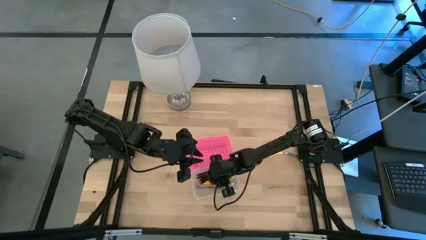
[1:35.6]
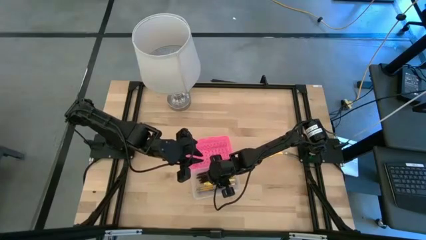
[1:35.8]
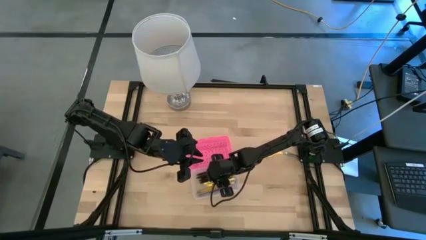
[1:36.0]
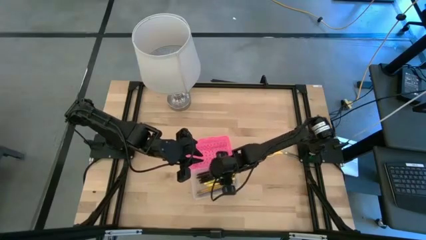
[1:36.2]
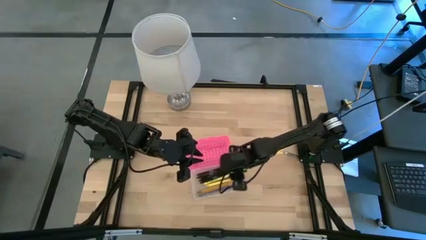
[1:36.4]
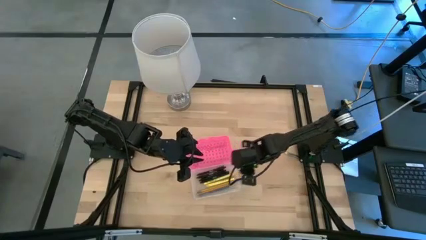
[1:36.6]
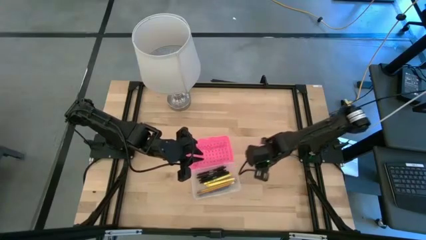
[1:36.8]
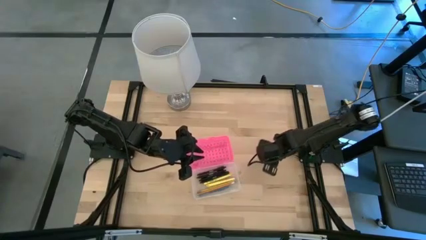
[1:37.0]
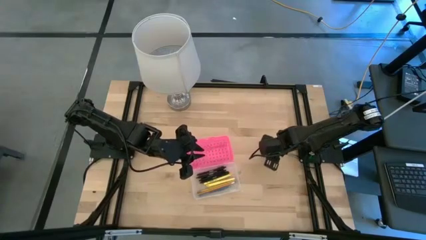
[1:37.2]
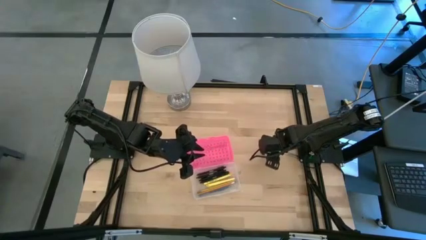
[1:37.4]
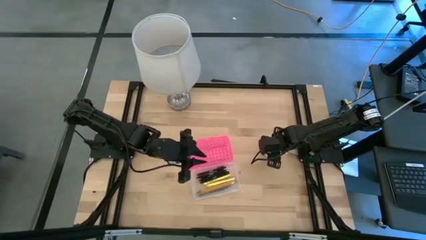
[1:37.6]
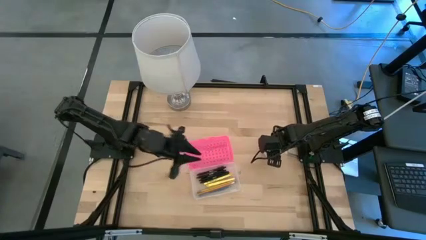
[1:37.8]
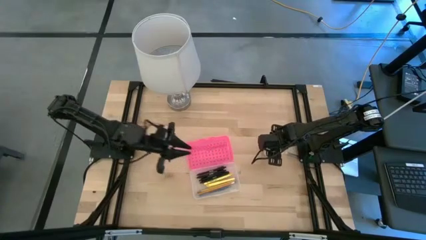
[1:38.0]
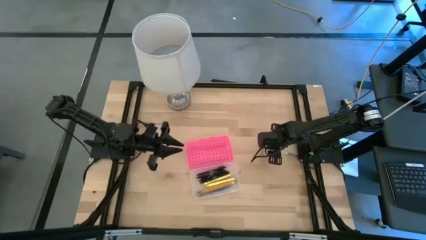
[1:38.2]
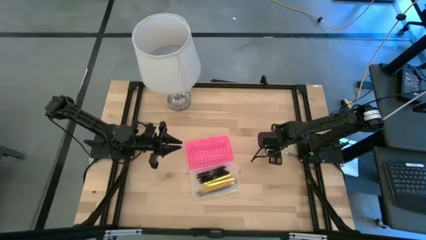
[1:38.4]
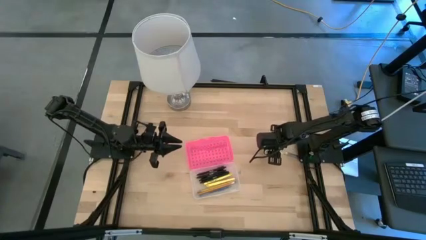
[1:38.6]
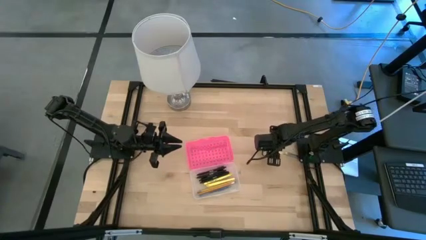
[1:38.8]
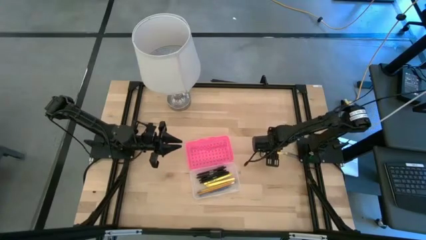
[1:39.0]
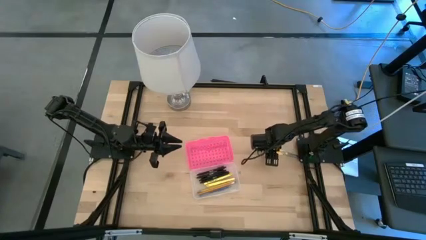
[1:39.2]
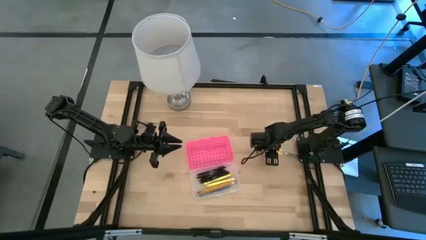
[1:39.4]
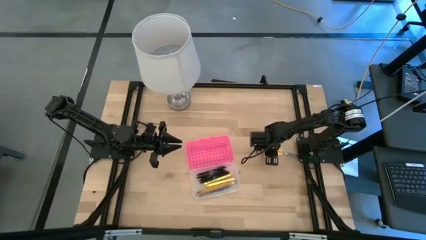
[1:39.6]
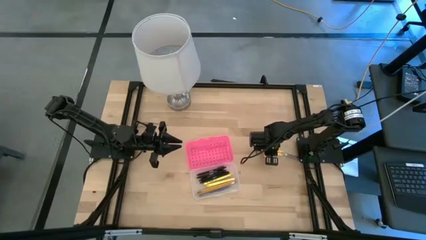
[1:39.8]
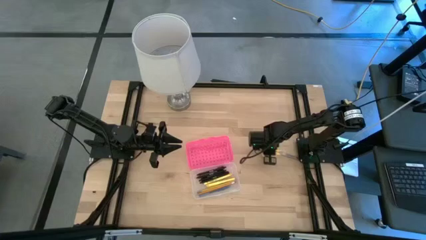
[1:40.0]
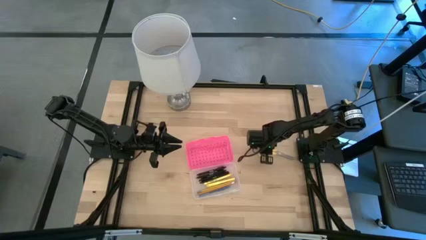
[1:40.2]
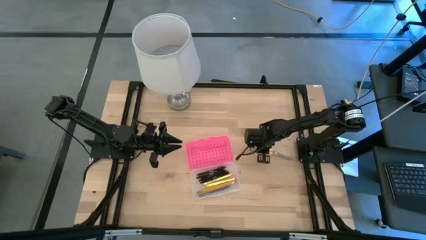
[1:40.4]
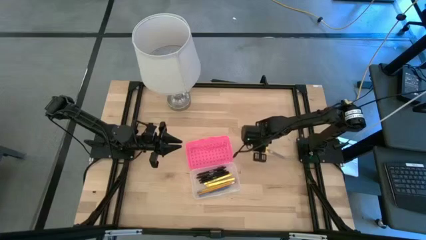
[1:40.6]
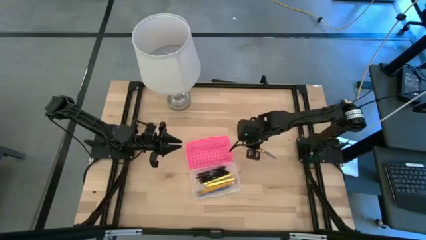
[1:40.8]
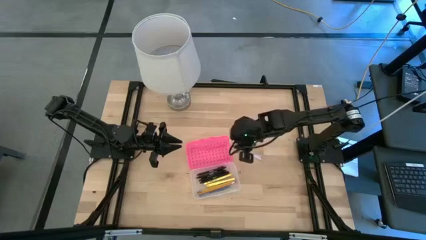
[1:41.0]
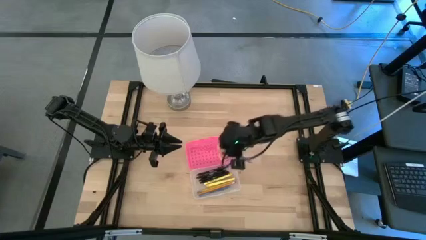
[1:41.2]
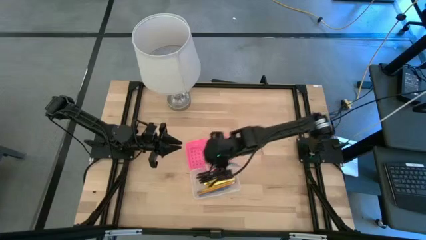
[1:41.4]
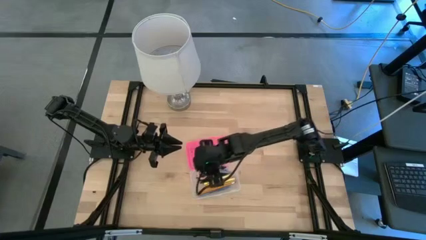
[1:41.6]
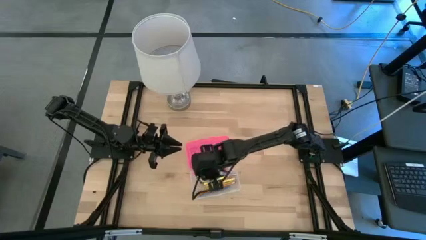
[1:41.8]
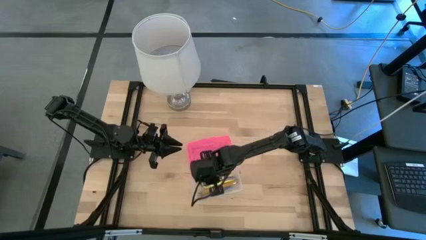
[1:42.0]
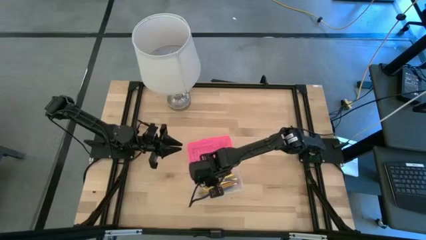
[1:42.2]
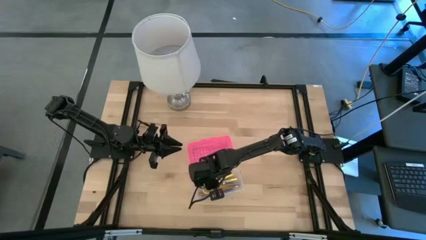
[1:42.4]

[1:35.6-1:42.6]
Task: Pick & place school supplies into a supply box
Put the yellow scissors into the transparent supply box

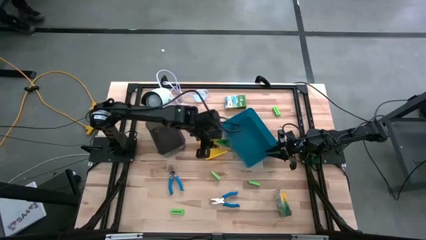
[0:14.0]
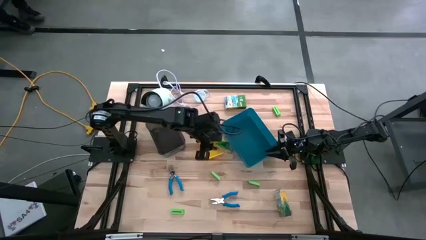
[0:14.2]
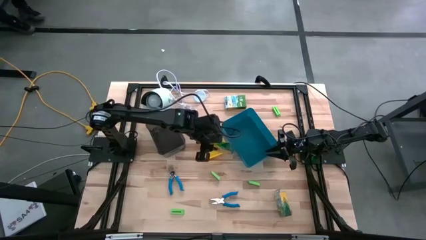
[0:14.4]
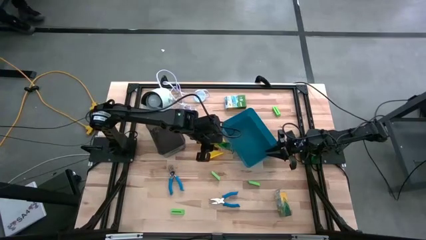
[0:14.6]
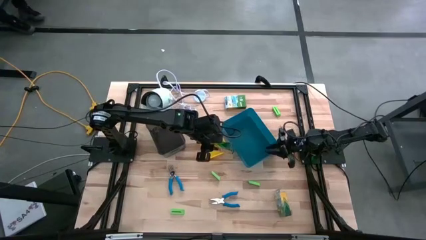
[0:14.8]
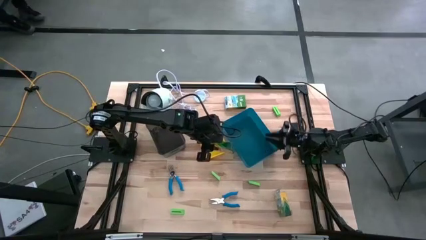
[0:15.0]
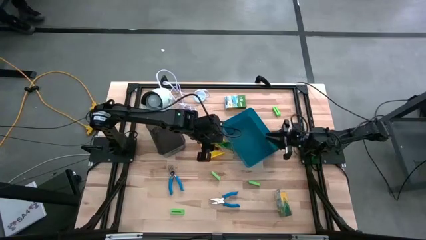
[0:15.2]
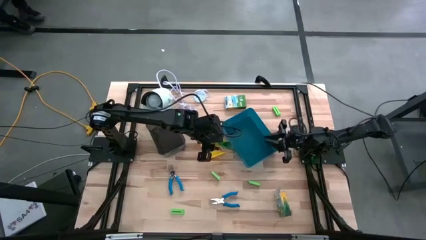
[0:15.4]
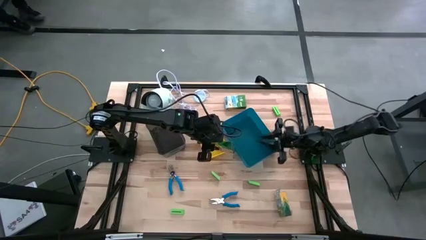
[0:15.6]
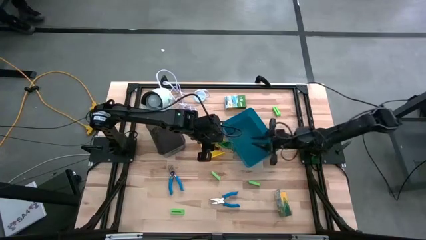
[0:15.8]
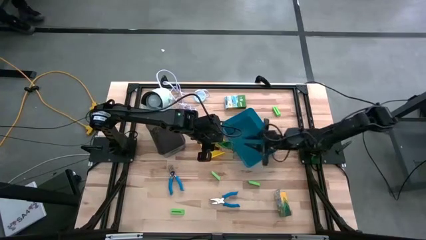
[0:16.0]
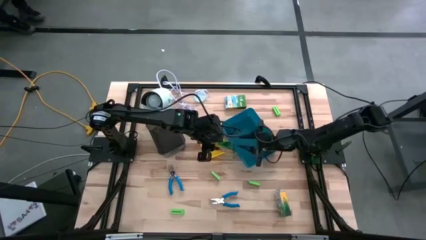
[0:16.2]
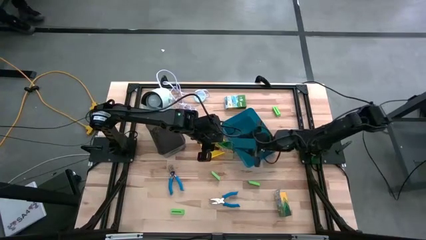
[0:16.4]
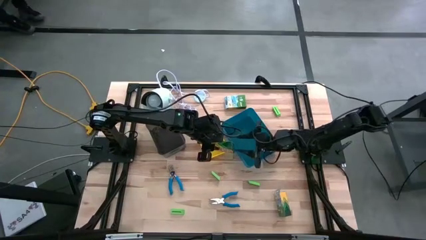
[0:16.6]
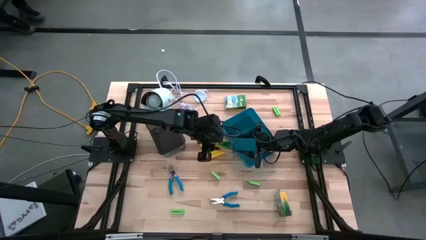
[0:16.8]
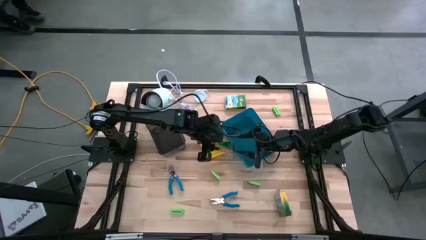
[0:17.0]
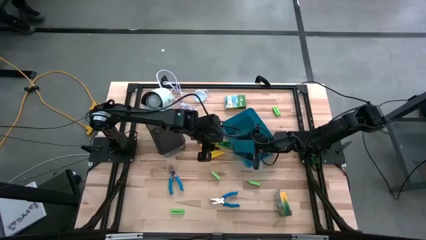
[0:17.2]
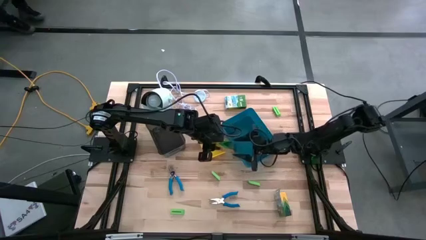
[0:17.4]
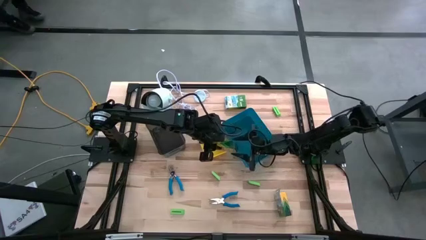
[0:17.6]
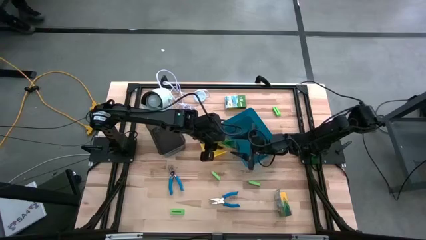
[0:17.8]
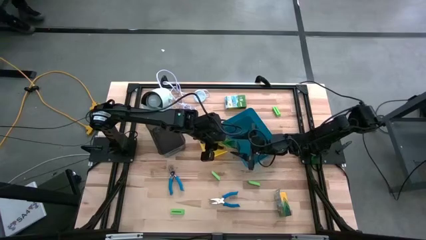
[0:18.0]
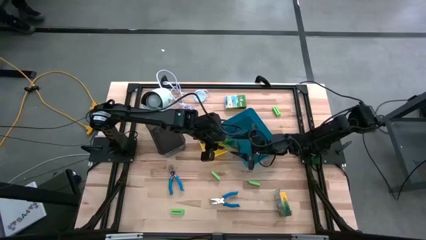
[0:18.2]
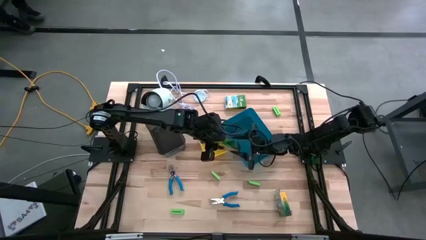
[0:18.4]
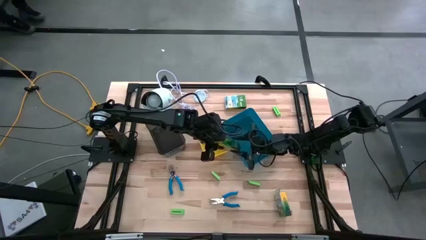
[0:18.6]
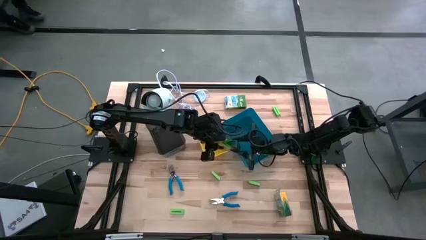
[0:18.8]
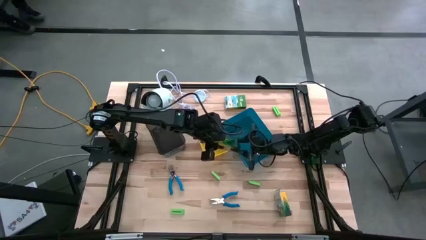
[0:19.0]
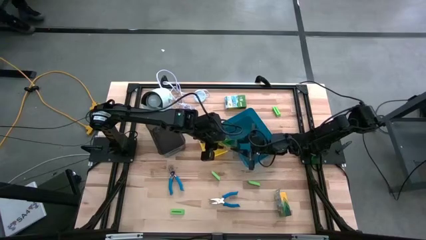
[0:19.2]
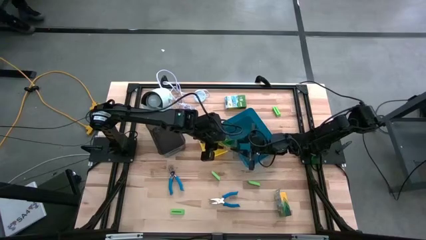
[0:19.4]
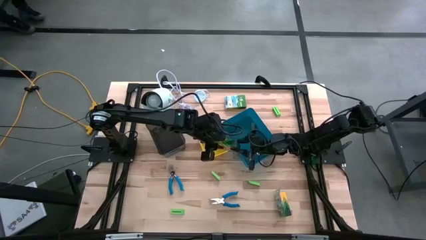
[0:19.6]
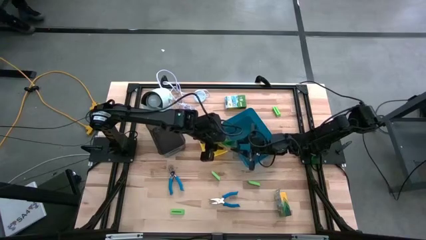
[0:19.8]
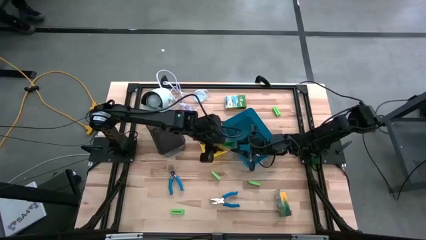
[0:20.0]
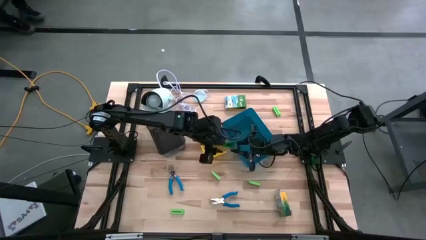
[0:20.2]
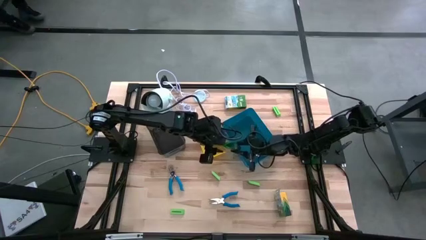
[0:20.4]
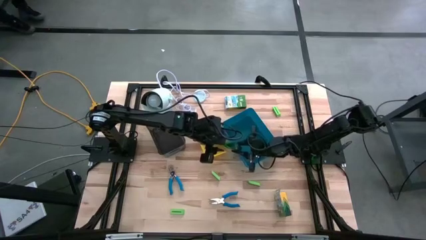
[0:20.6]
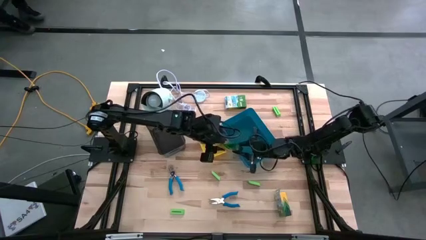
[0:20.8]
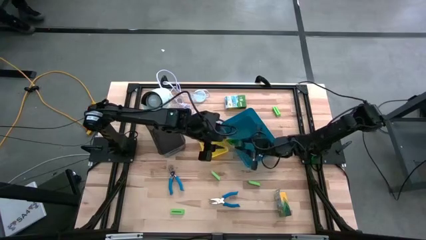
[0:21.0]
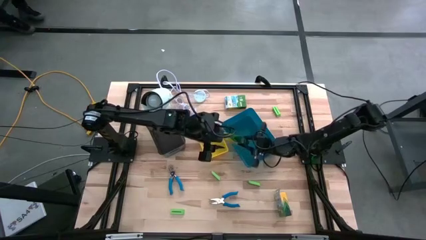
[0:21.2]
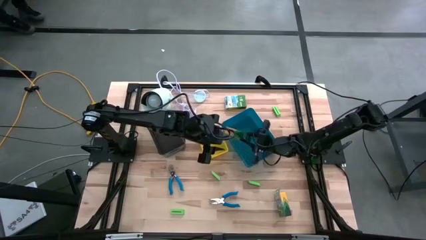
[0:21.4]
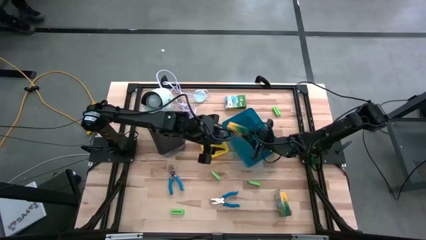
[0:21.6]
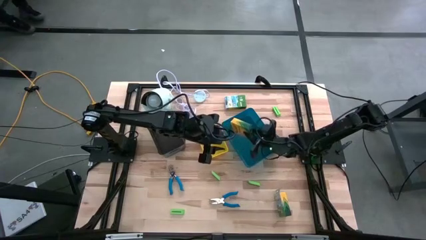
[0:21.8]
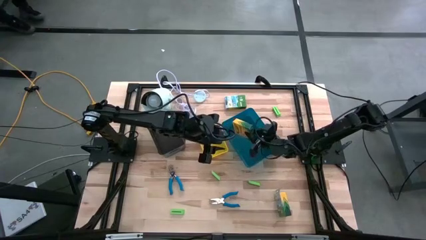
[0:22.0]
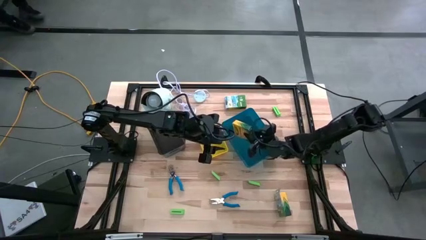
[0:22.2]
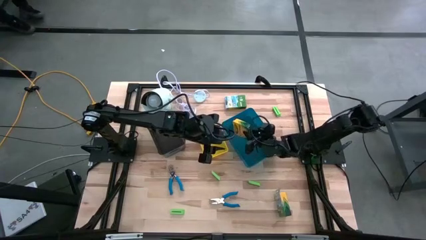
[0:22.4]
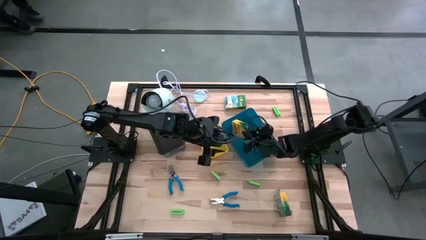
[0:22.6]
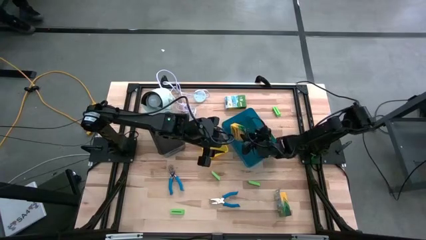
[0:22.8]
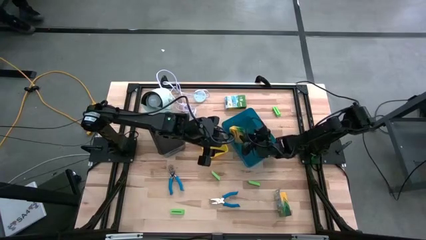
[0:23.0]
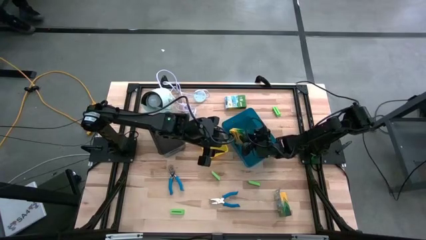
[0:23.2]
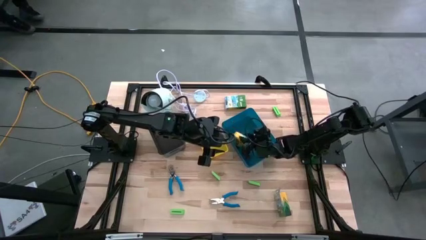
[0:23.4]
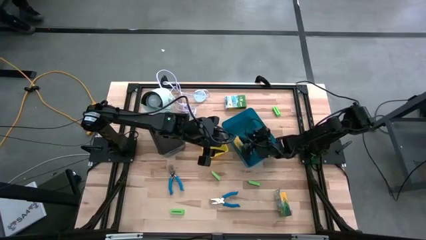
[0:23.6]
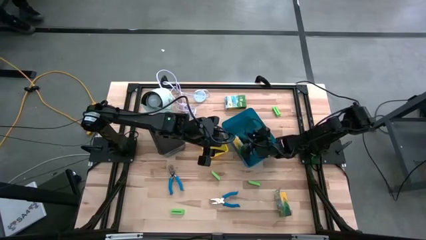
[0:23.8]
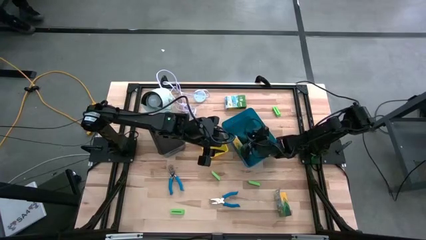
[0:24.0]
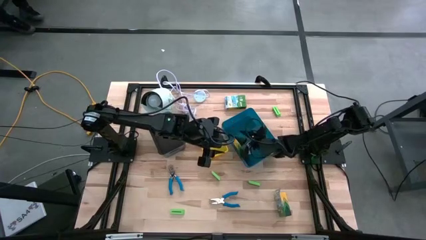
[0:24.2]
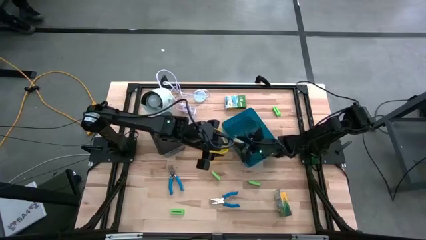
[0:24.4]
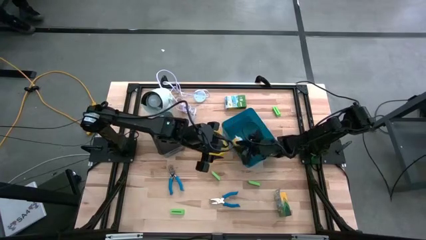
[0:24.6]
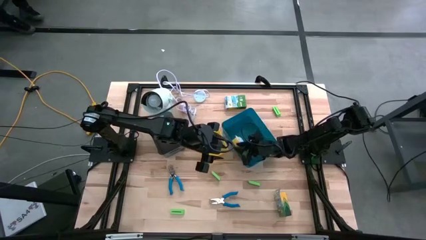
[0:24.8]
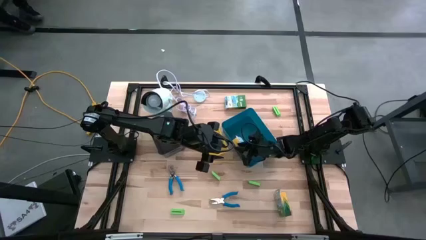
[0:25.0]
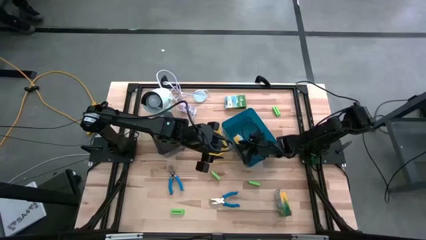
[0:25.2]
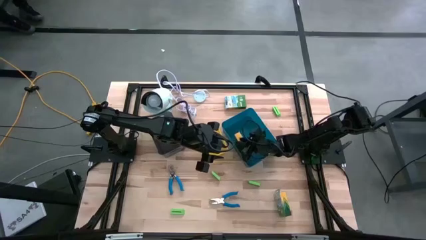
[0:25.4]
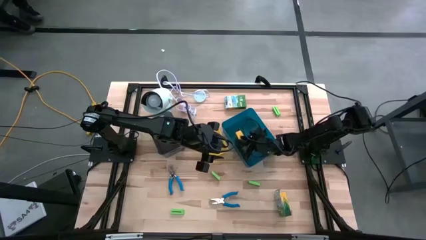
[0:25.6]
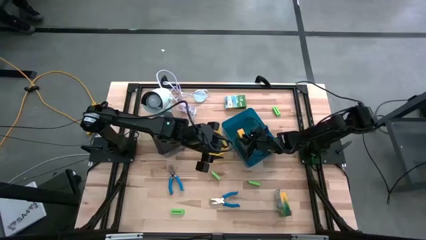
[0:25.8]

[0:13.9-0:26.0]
Task: Pick & Place School Supplies
Put the crayons box into the blue bin
